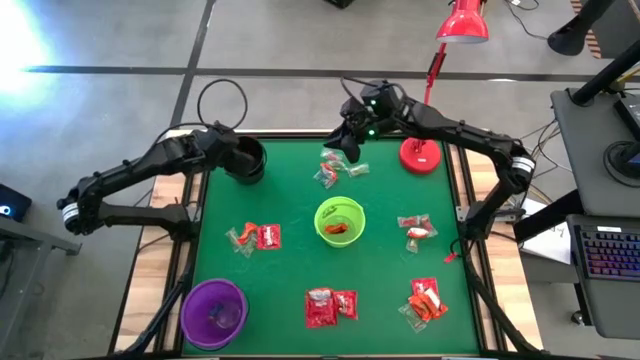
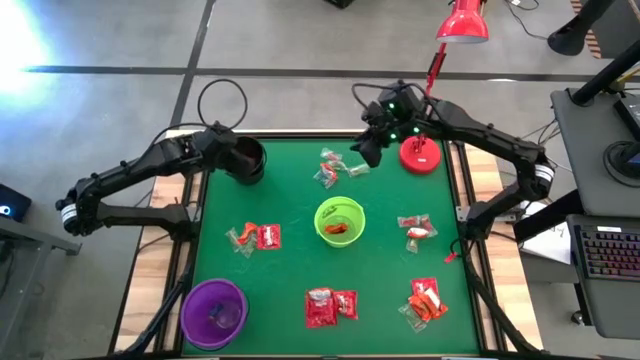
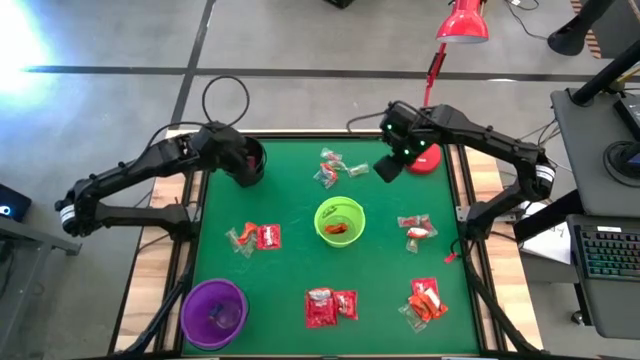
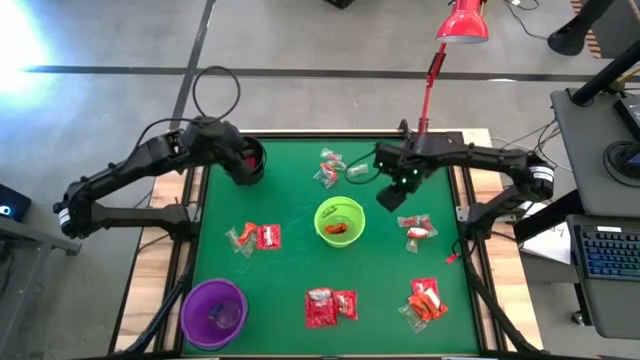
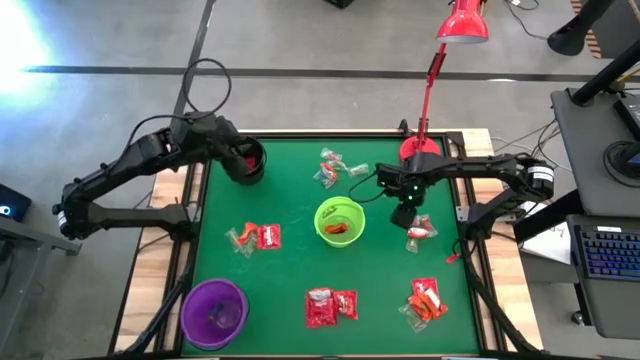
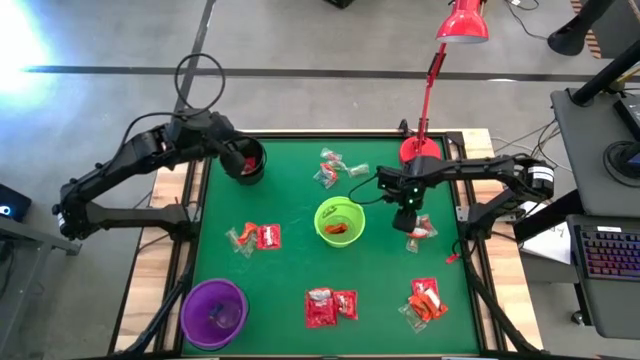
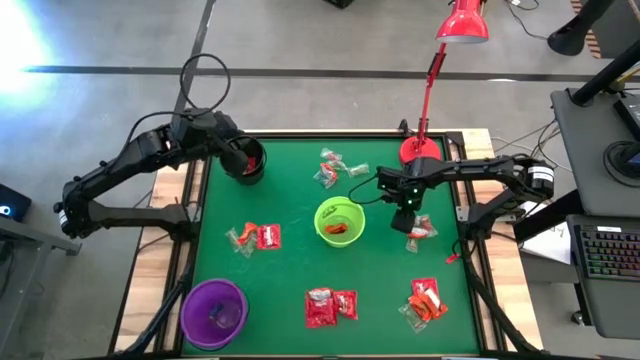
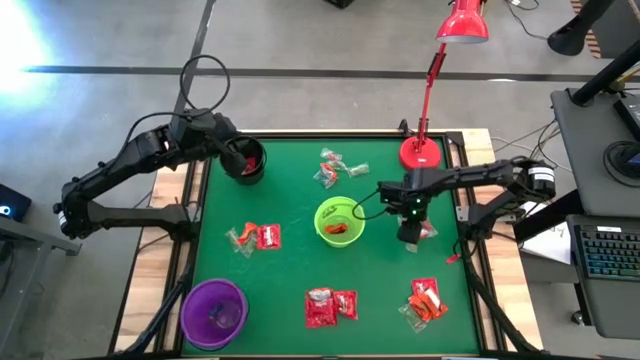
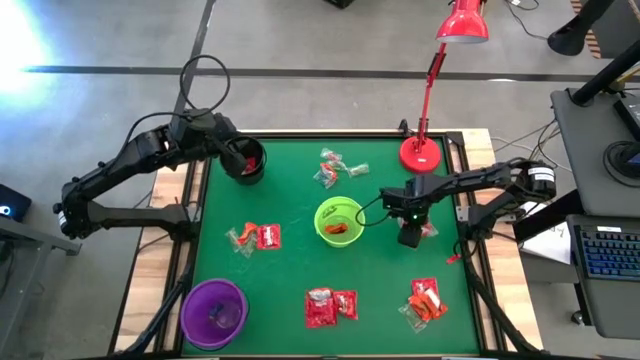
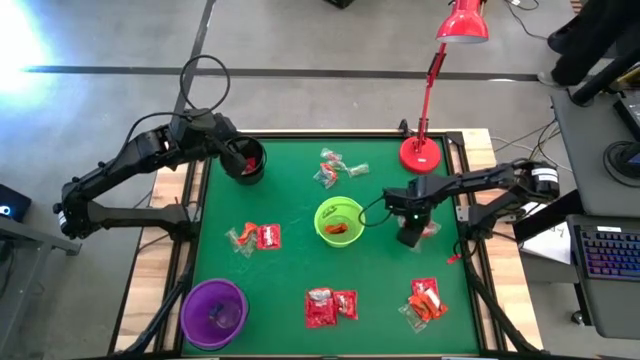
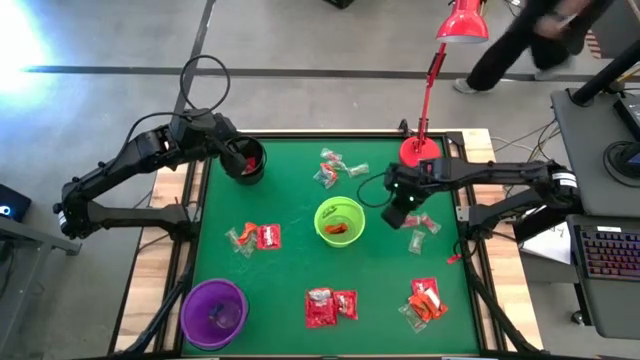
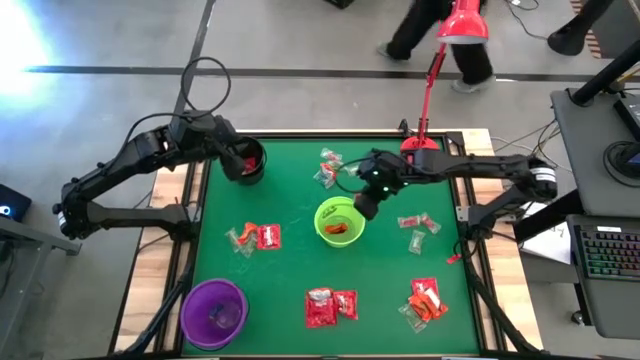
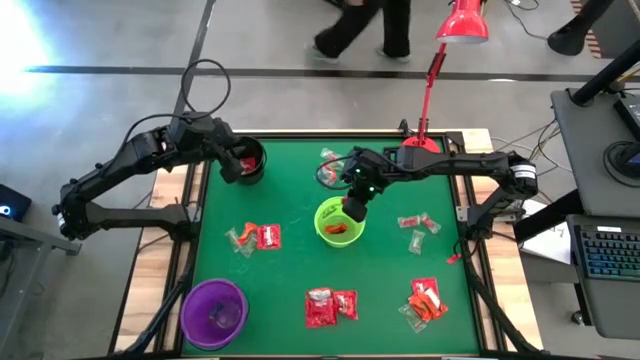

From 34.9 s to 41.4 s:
Task: Sort candy
Put the orange chocolate into the green bucket

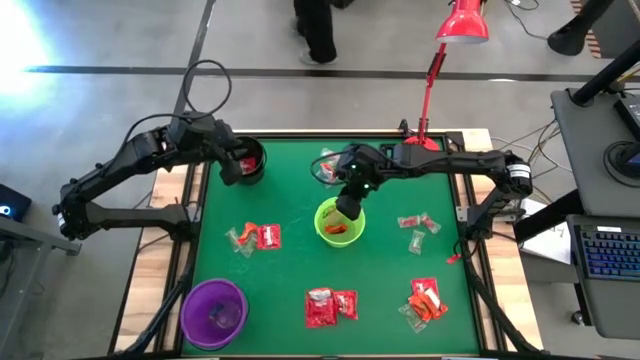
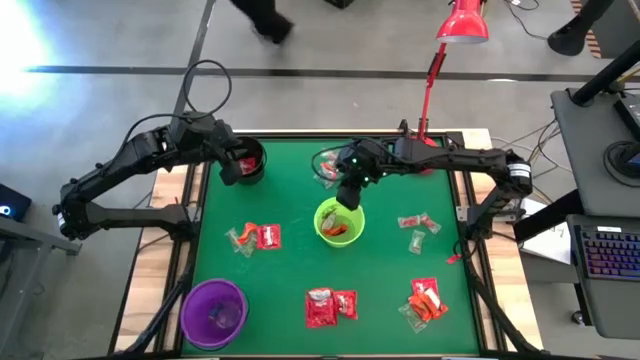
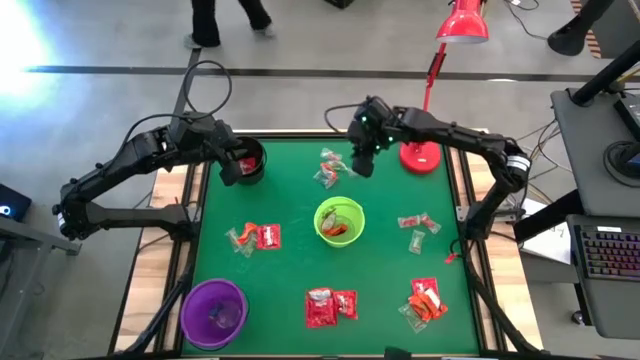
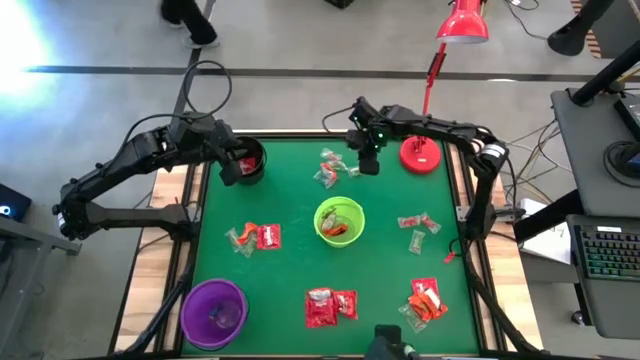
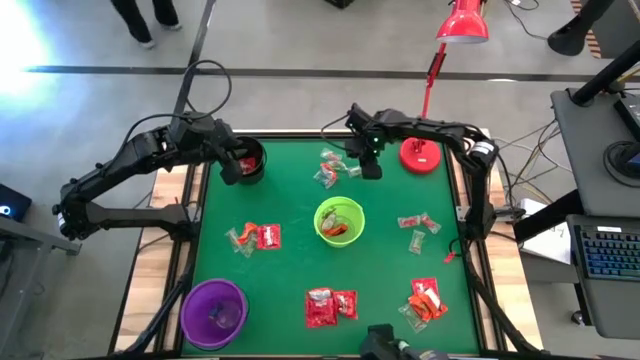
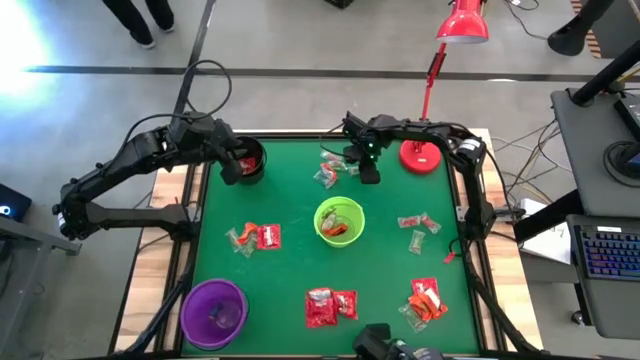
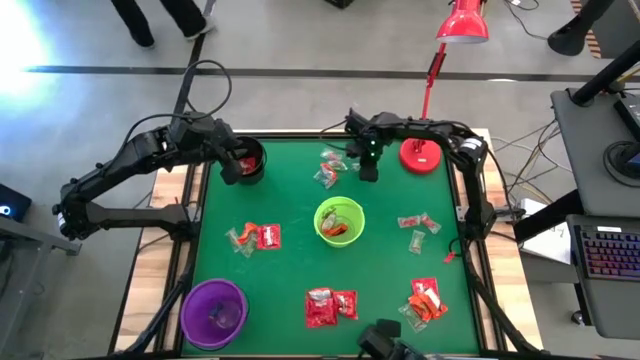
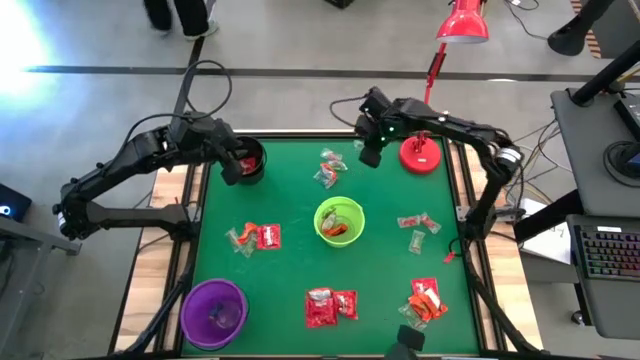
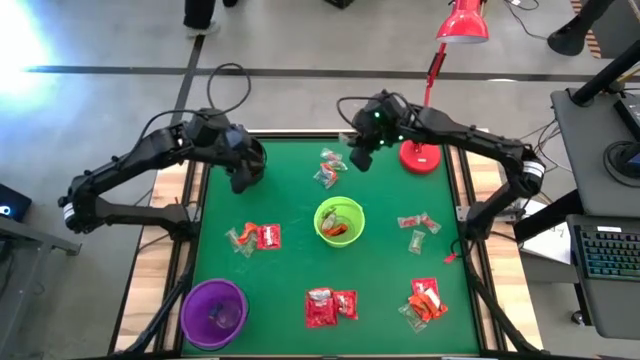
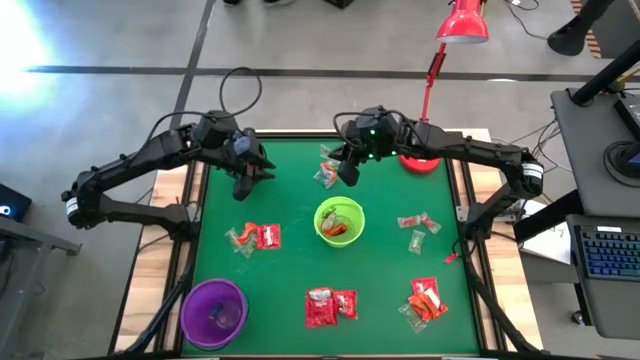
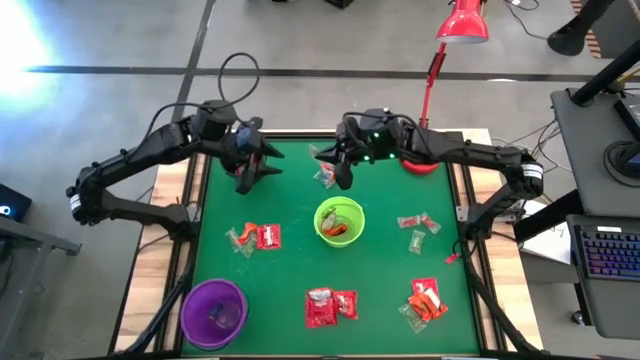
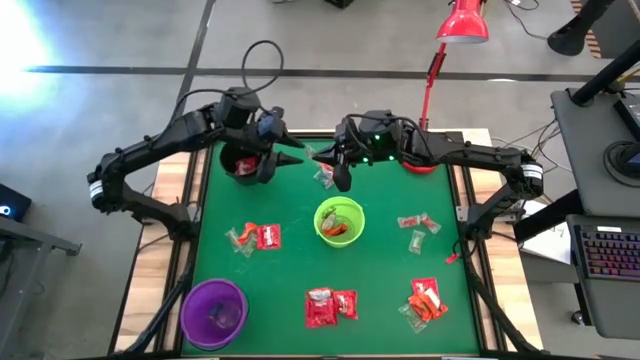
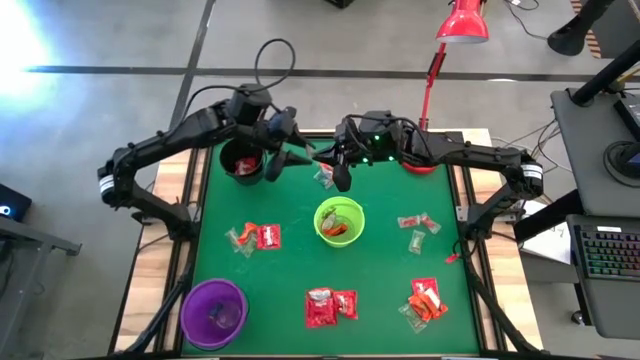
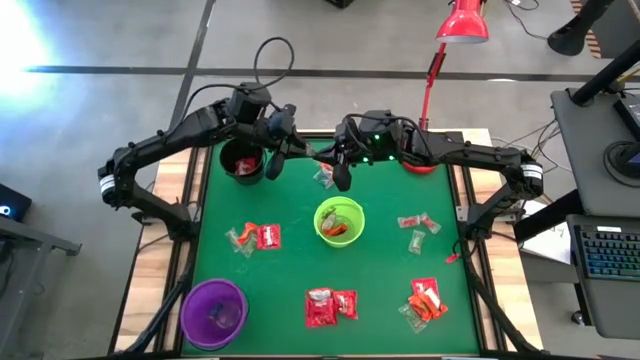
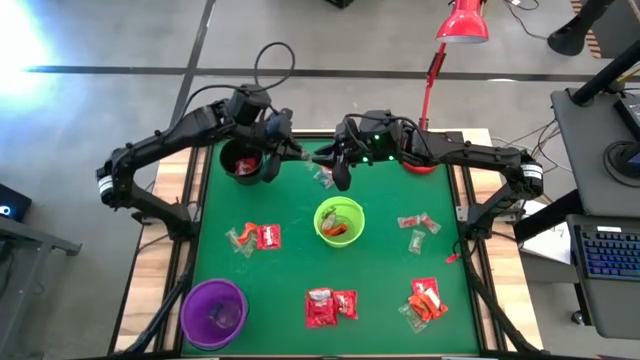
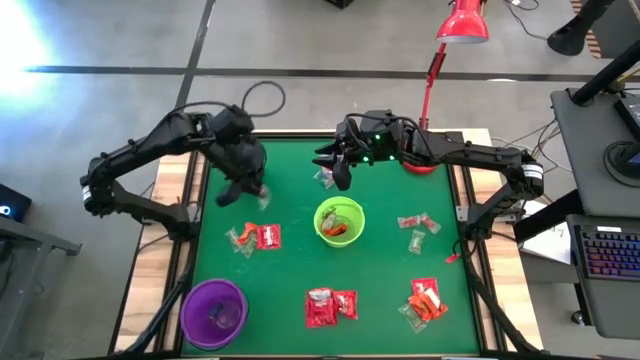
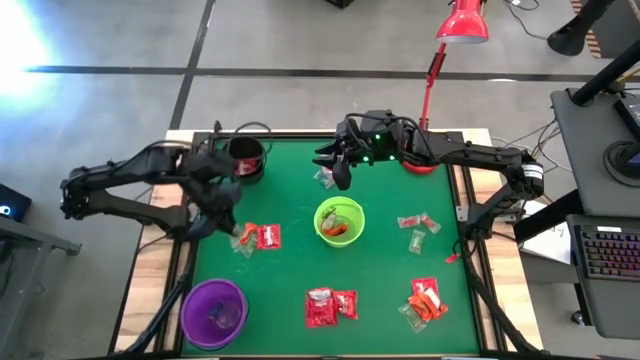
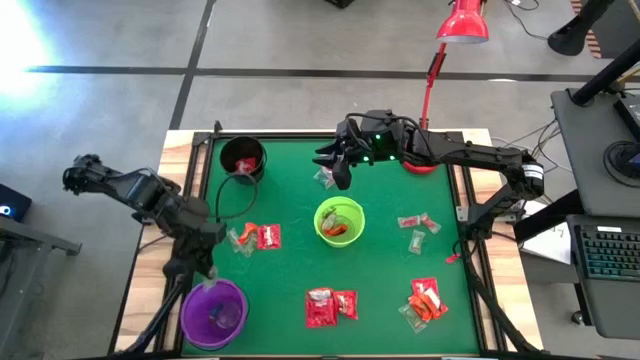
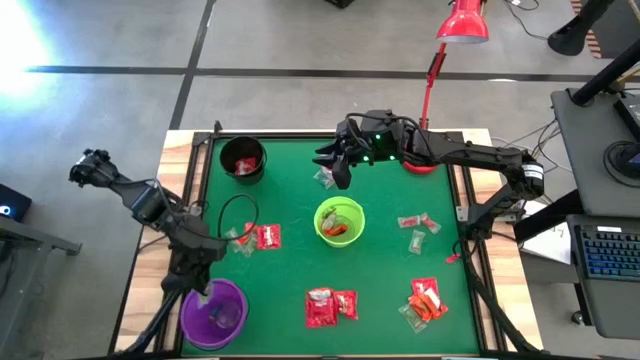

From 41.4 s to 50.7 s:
Put the green gummy into the purple bucket

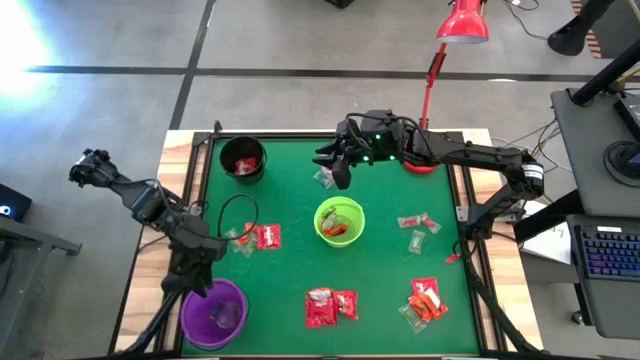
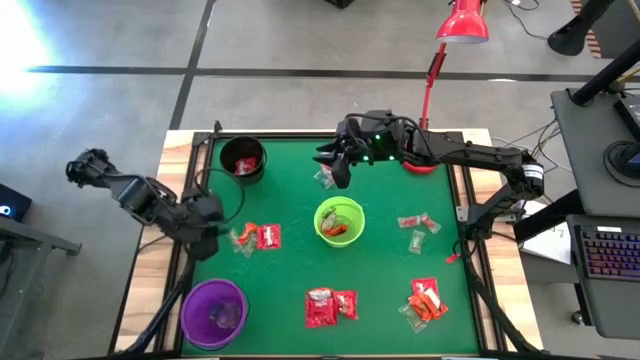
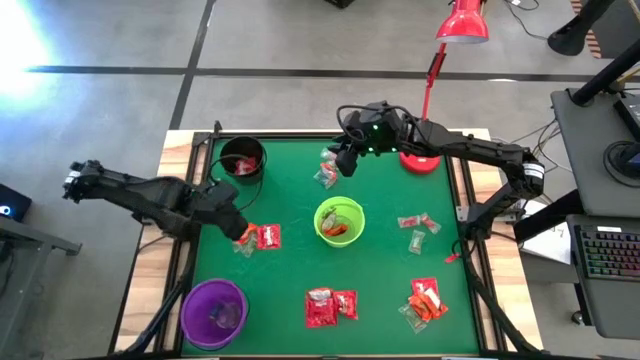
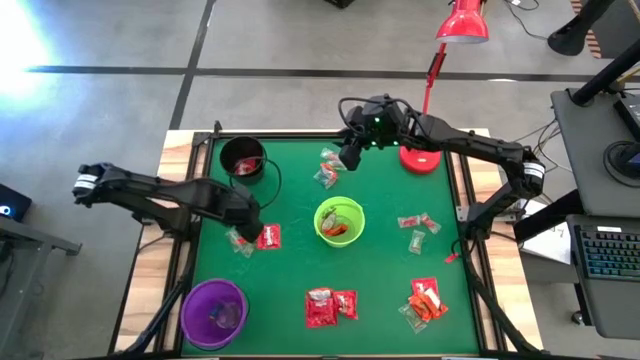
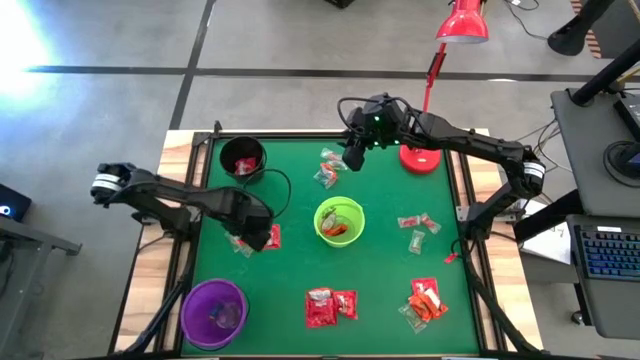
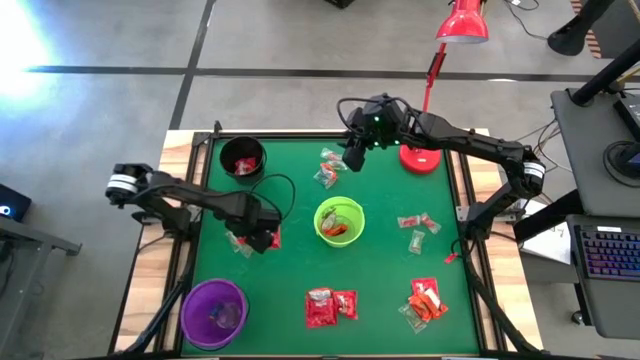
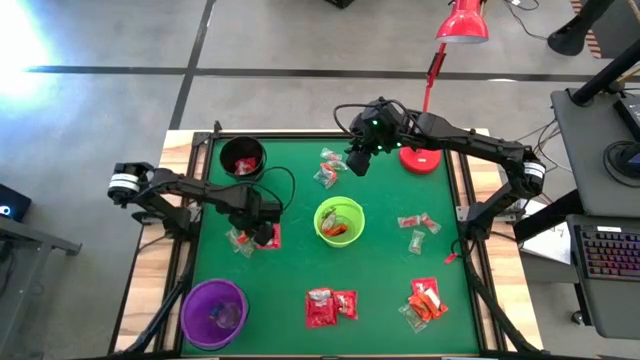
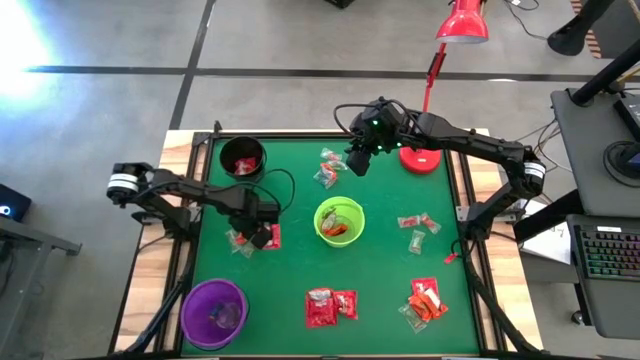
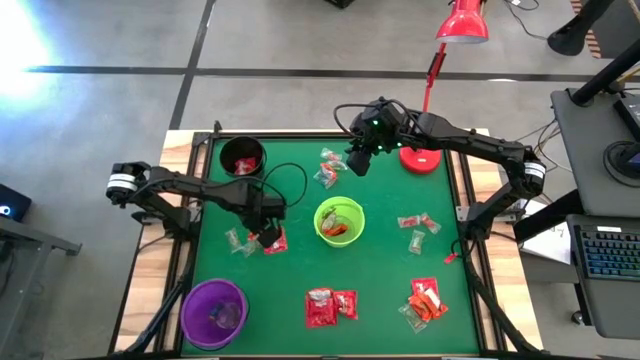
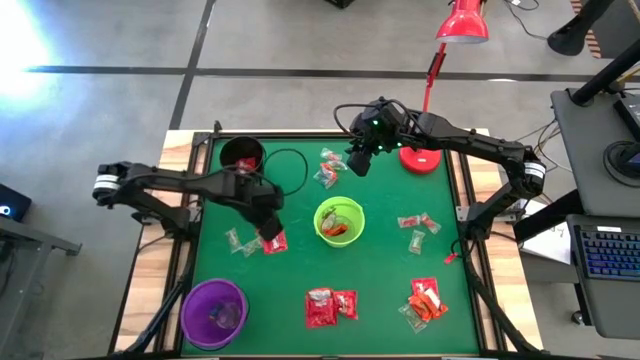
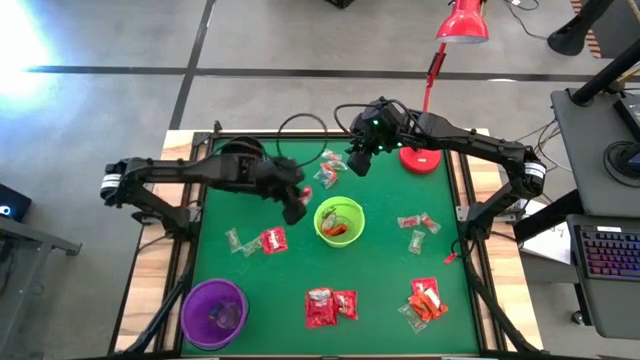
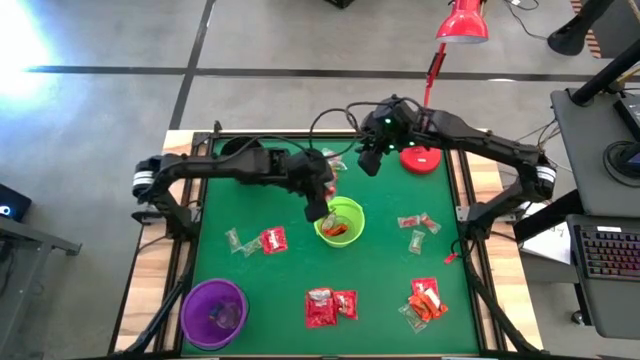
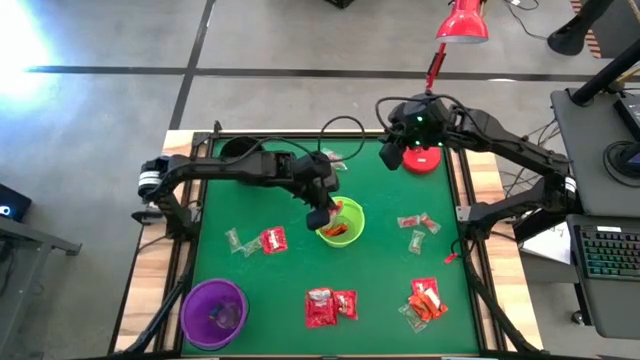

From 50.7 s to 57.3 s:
Put the orange chocolate into the green bucket
